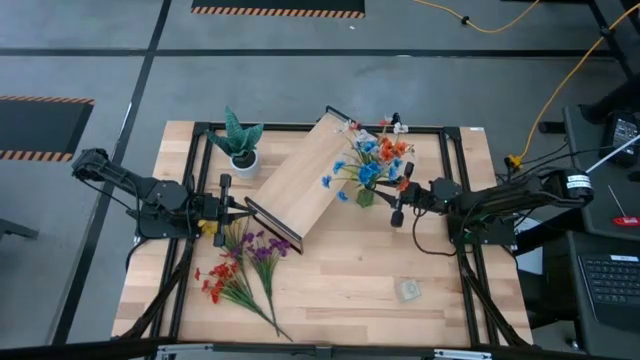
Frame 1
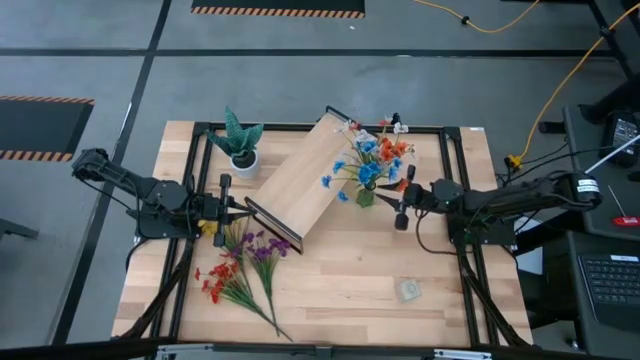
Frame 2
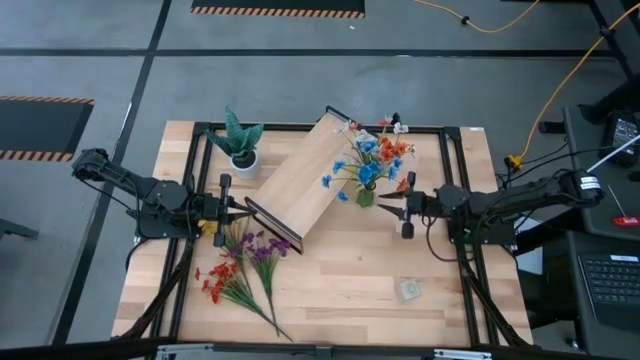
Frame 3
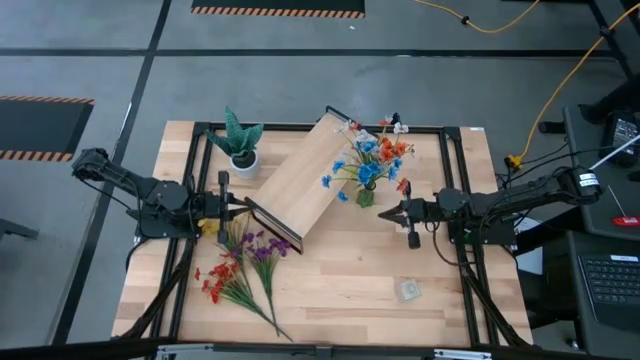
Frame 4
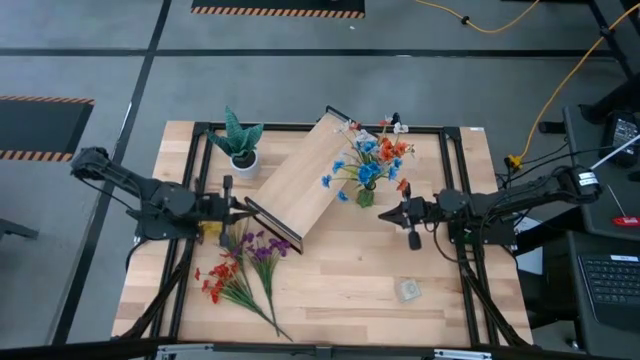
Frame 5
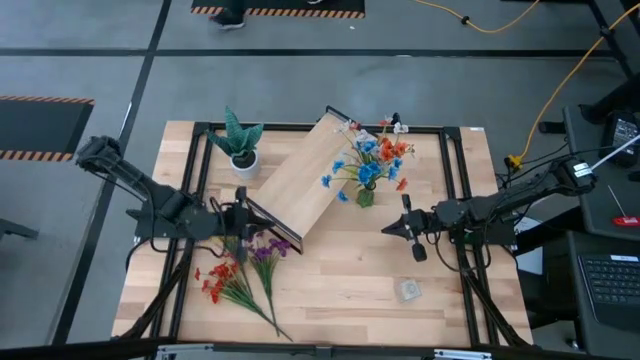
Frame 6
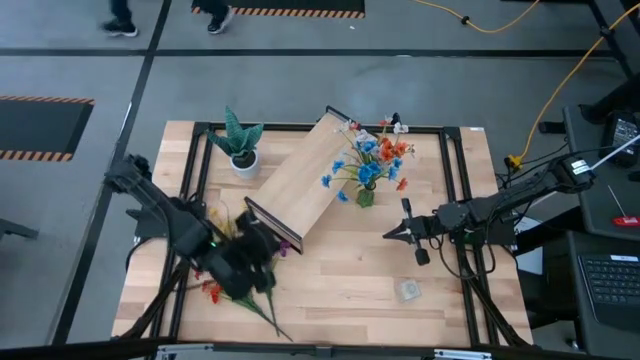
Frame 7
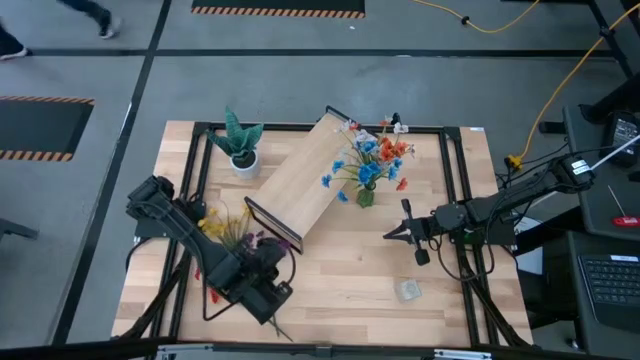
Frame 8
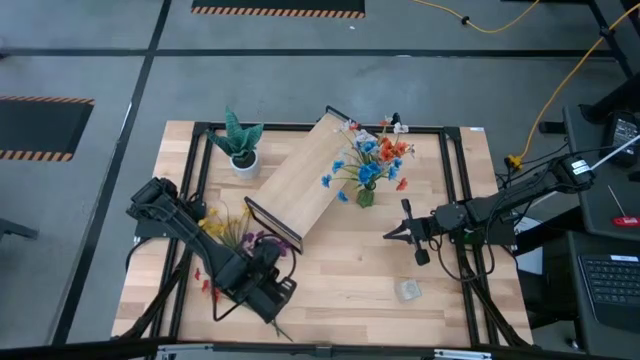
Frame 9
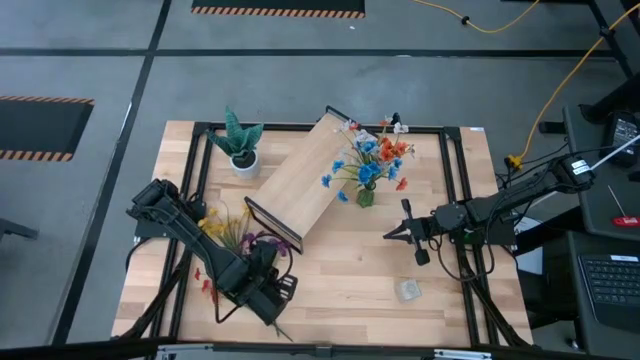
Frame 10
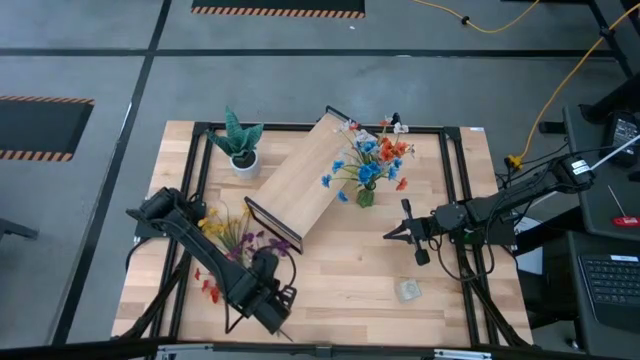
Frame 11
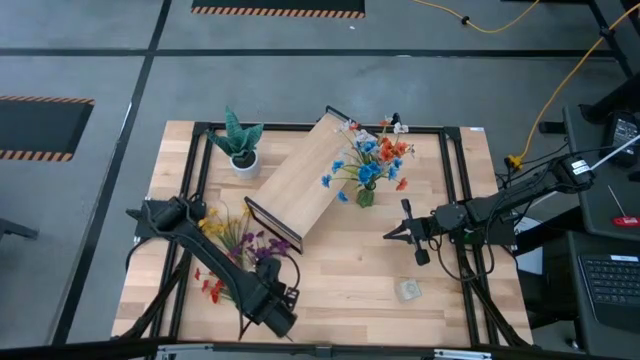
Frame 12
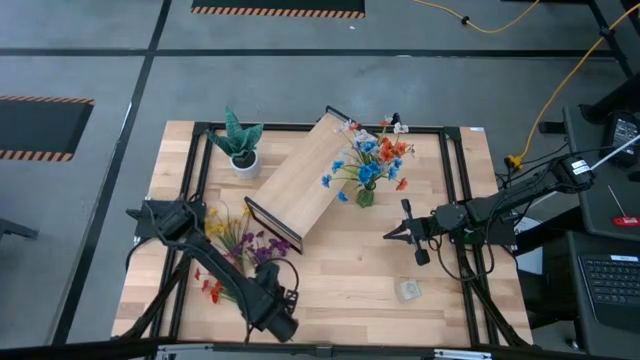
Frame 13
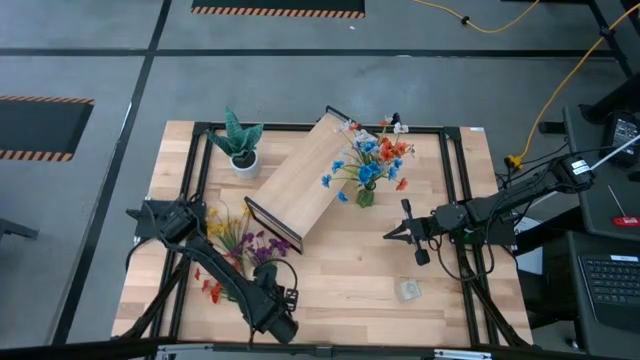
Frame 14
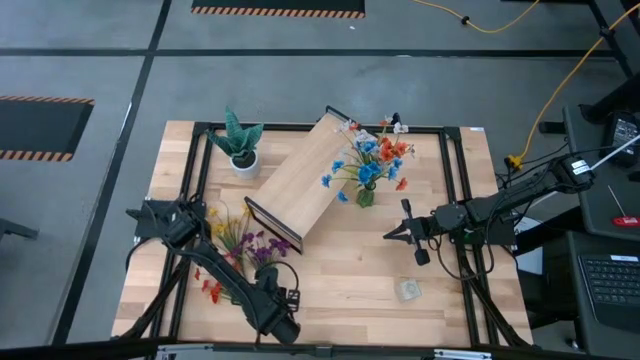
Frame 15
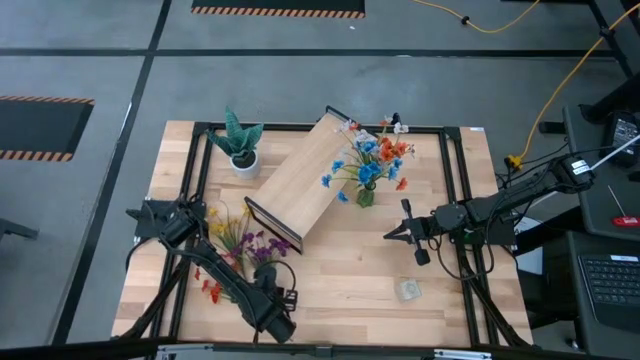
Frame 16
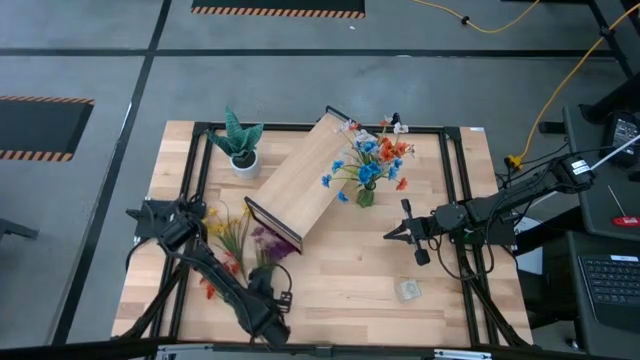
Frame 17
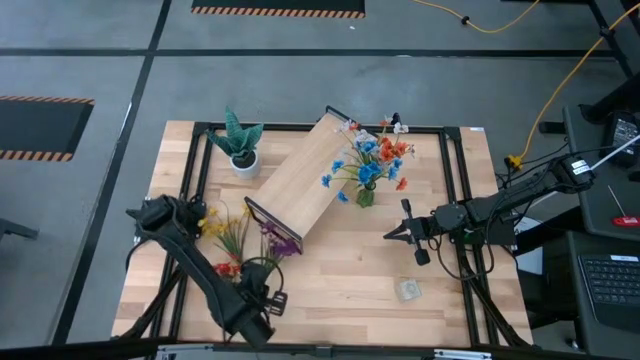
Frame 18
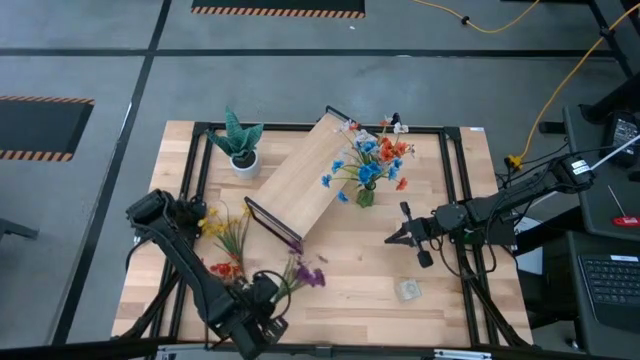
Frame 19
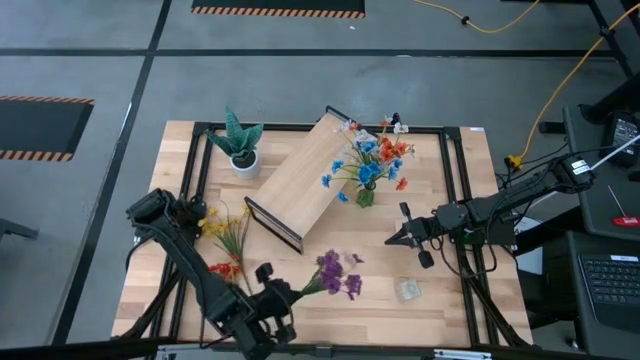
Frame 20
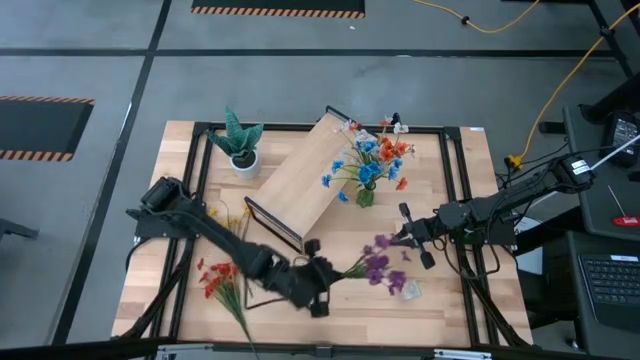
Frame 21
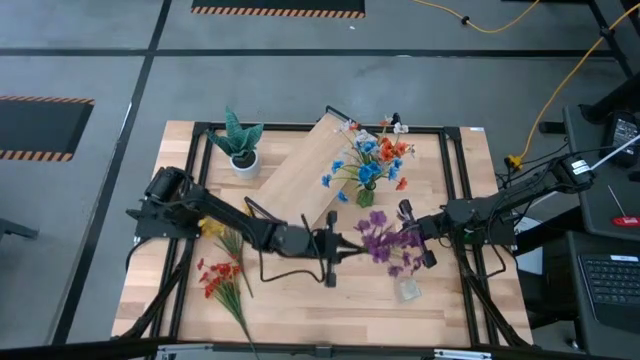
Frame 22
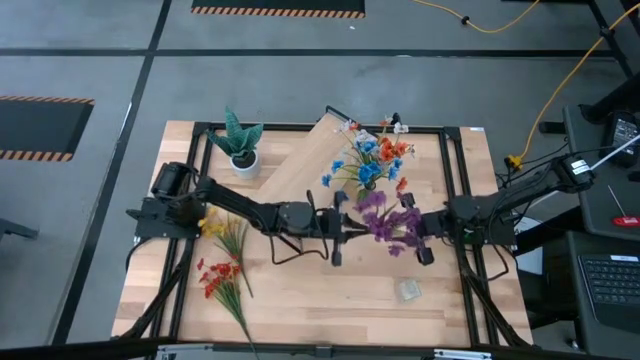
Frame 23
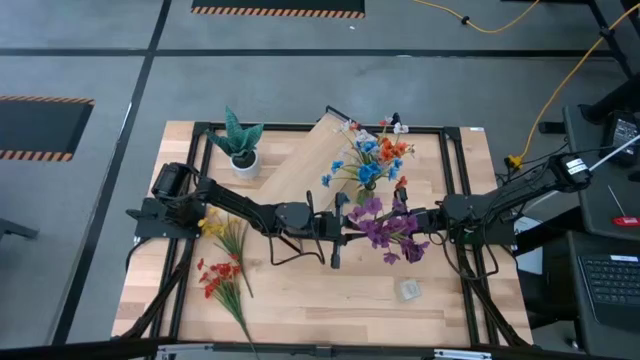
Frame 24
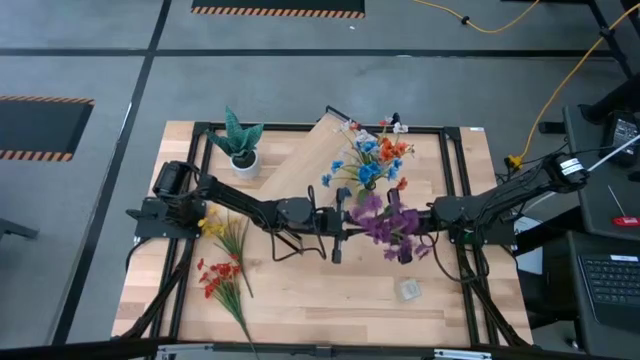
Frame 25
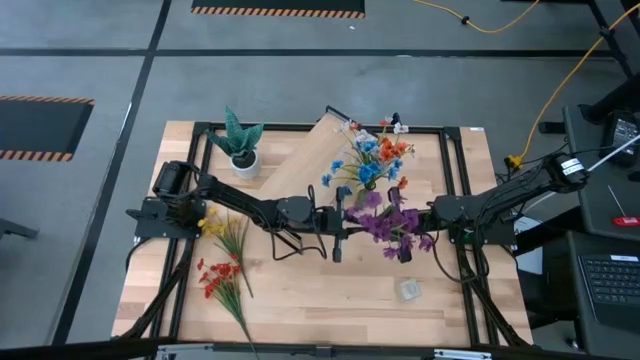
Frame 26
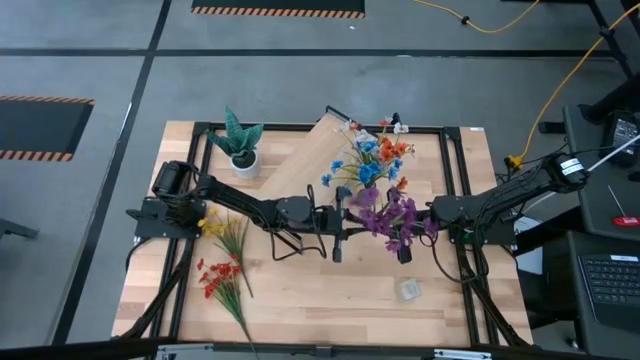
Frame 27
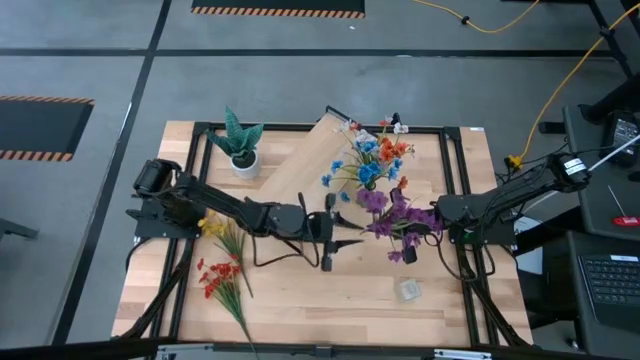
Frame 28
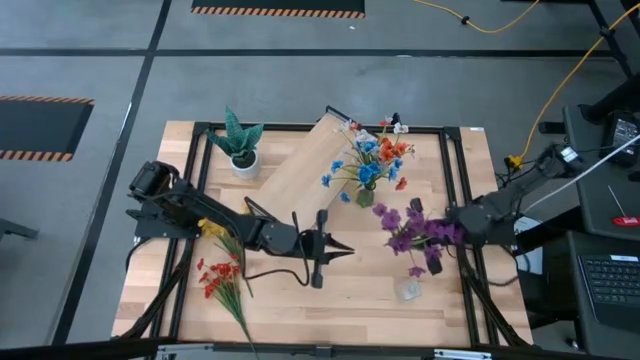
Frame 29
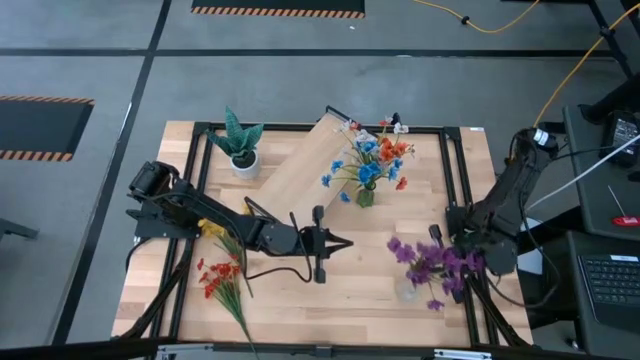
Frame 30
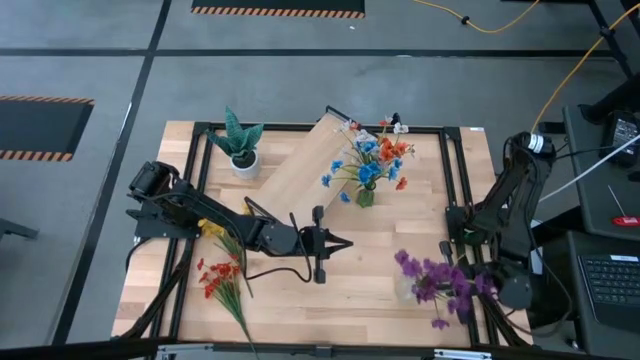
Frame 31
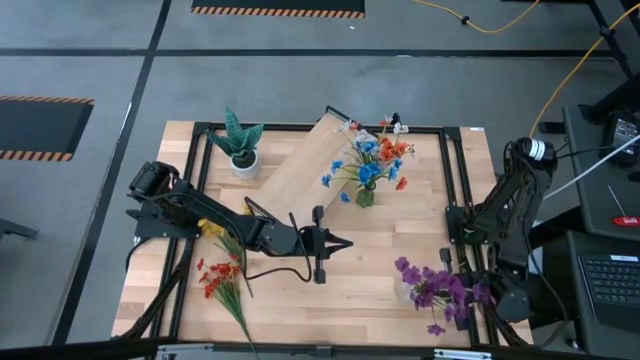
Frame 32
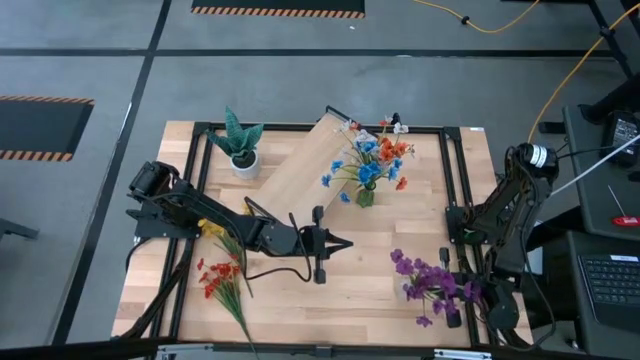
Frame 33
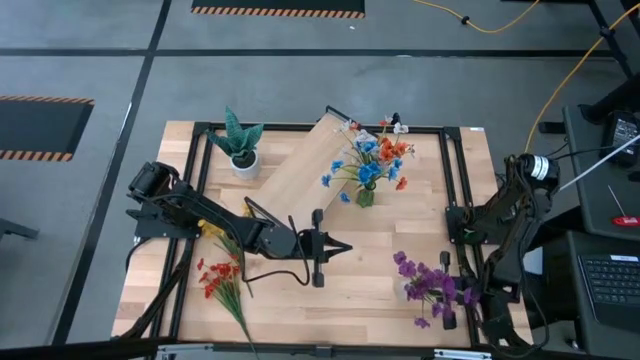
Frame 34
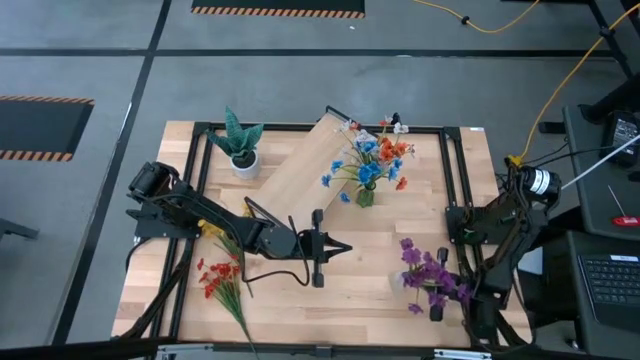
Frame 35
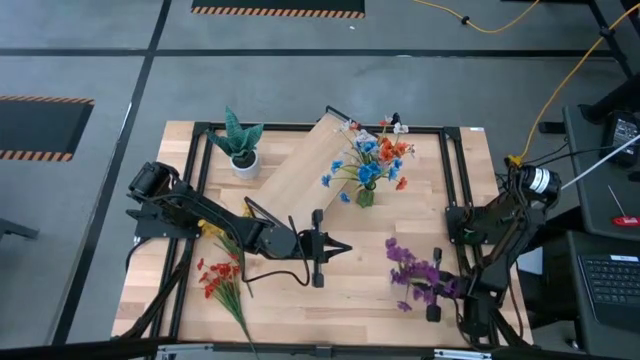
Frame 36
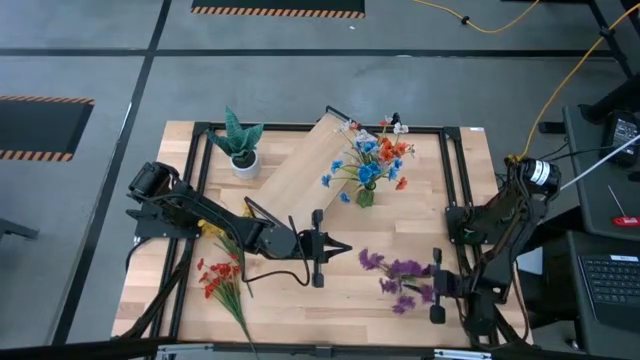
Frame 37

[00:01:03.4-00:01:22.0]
Task: Pick and place flowers into a vace then onto a shelf
Put the purple flowers into the transparent vase

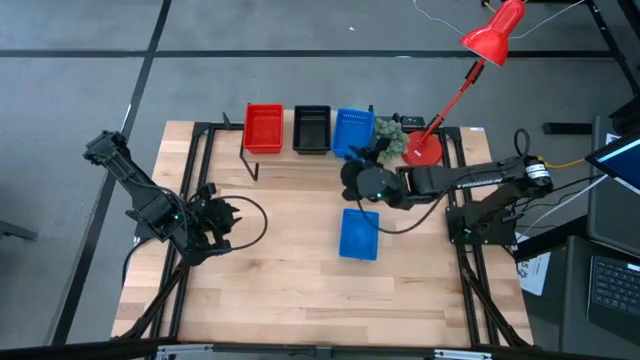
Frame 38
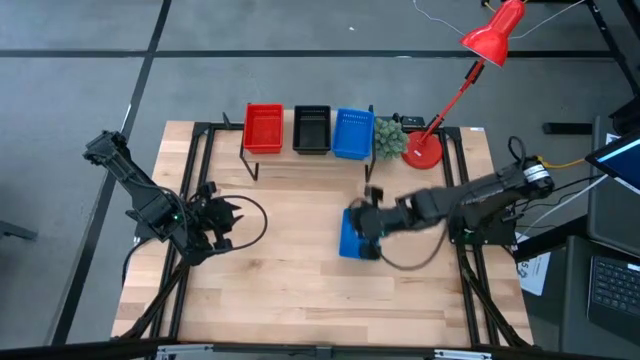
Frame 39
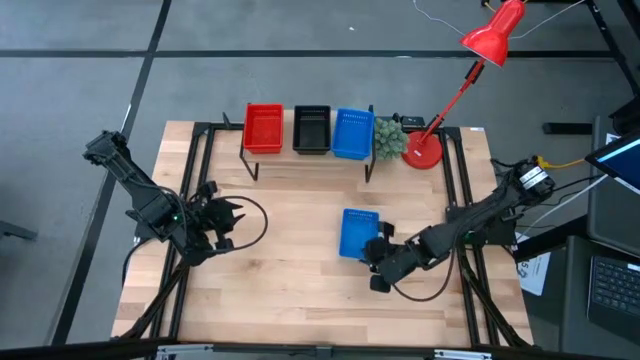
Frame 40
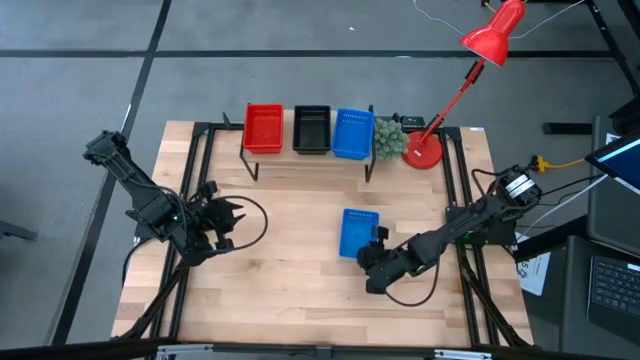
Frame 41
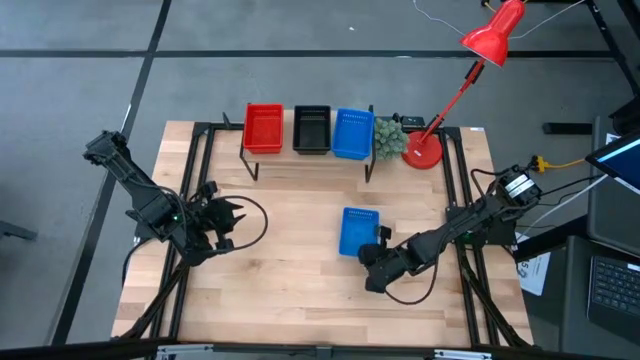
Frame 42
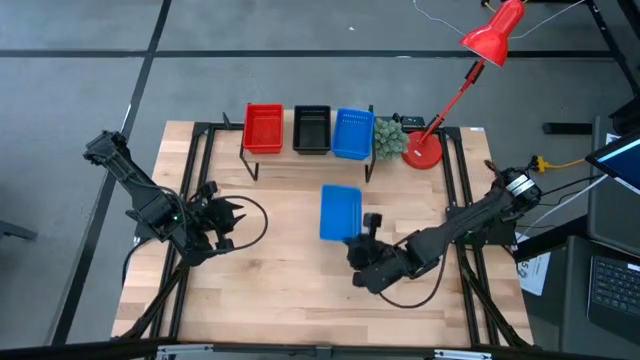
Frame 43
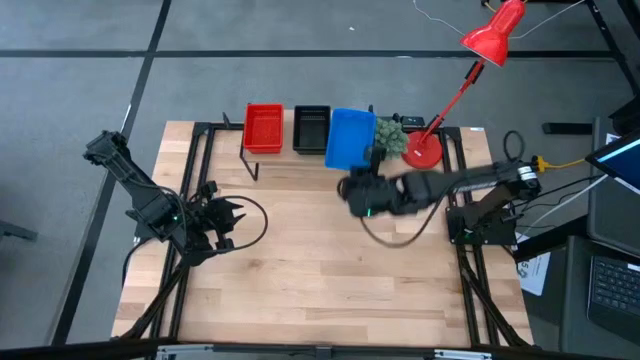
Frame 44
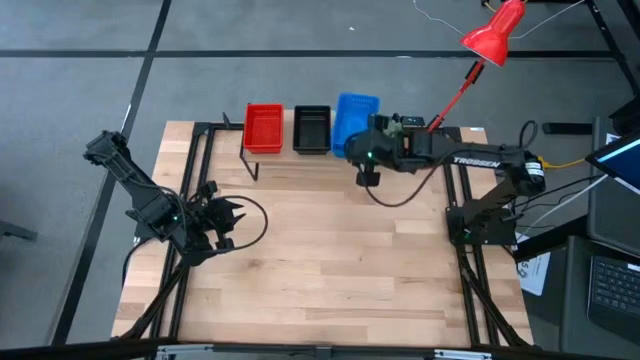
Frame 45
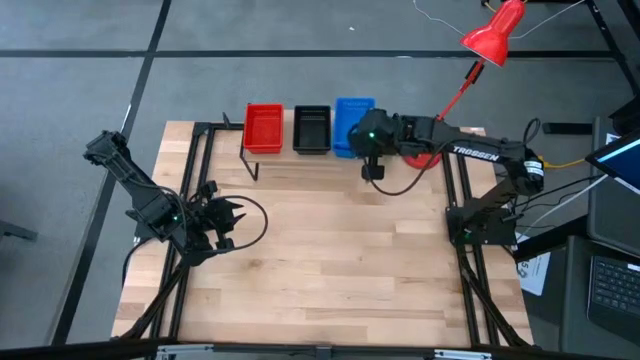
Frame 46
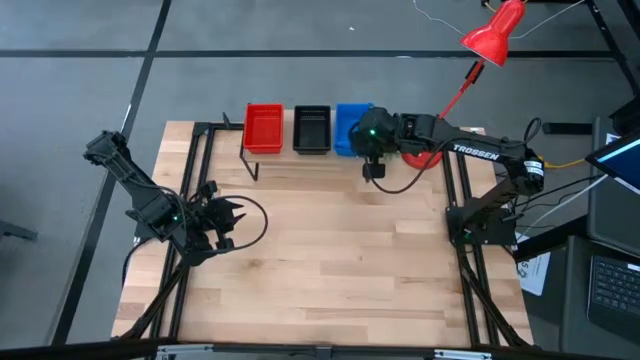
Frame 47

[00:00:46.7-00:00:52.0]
Task: Stack baskets on shelf by color
Stack the blue bin on top of the blue bin on the shelf
